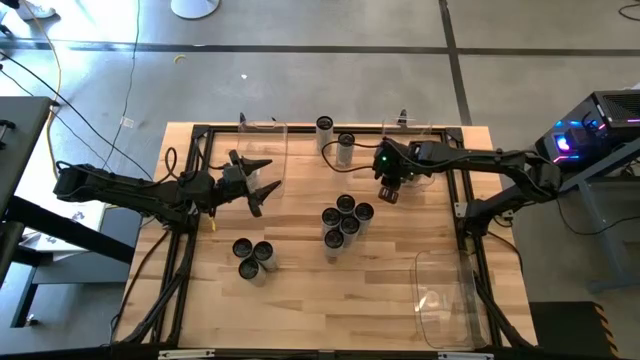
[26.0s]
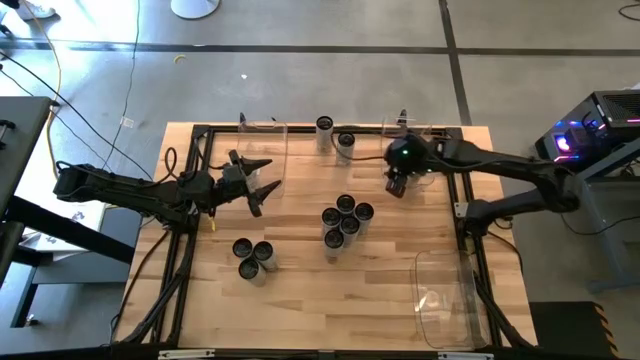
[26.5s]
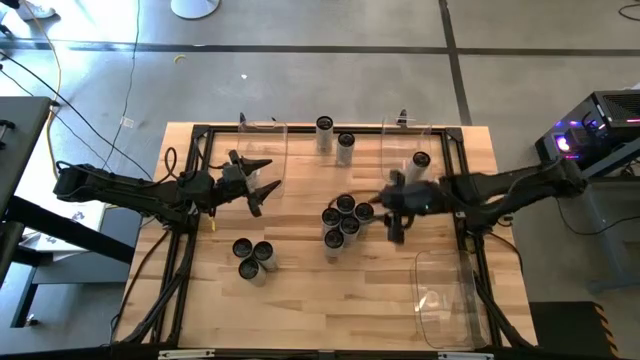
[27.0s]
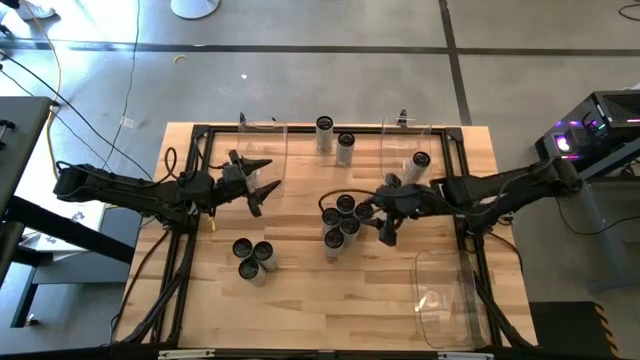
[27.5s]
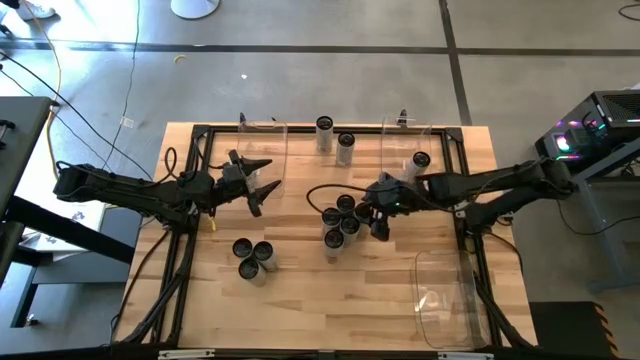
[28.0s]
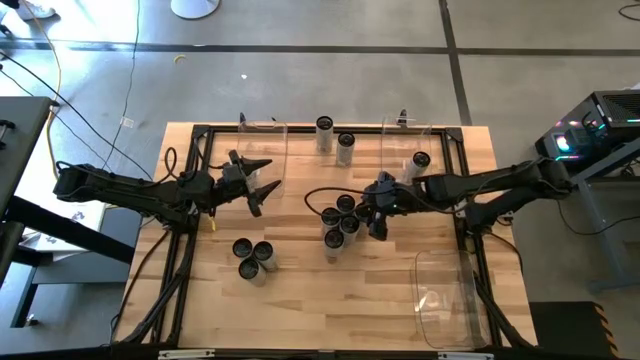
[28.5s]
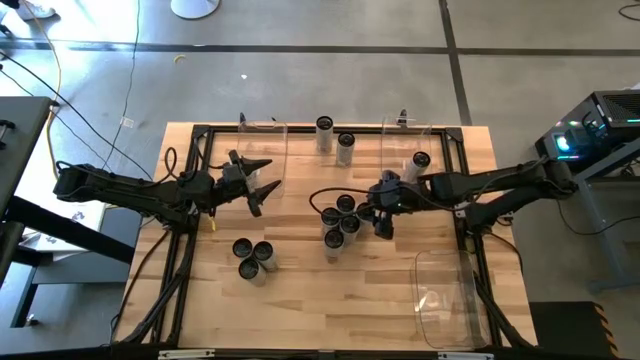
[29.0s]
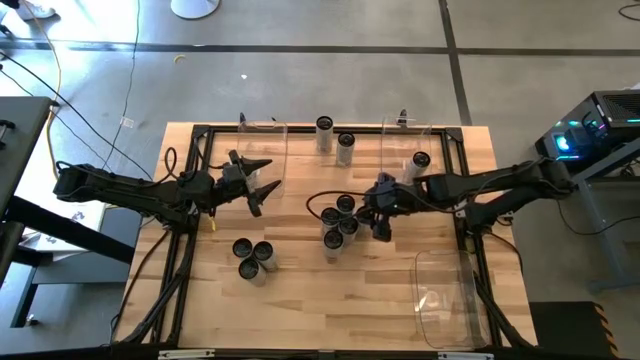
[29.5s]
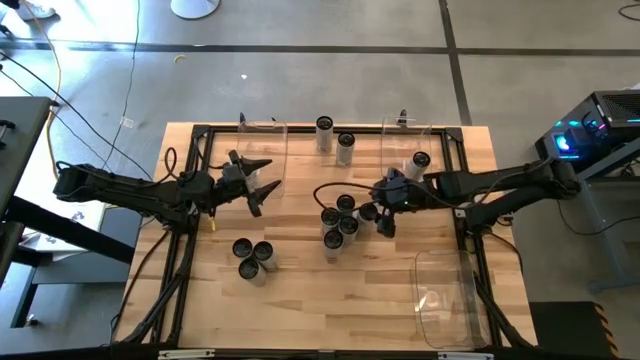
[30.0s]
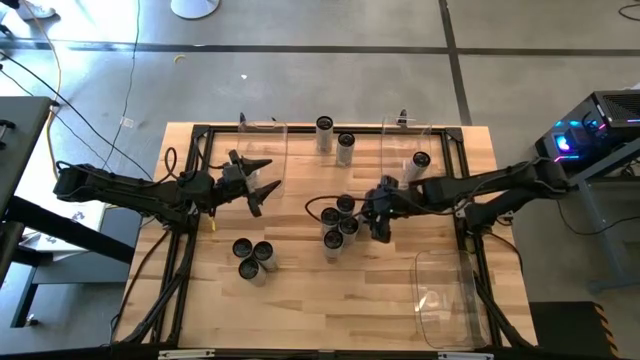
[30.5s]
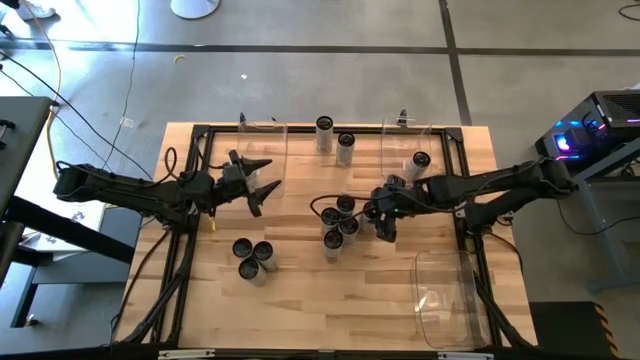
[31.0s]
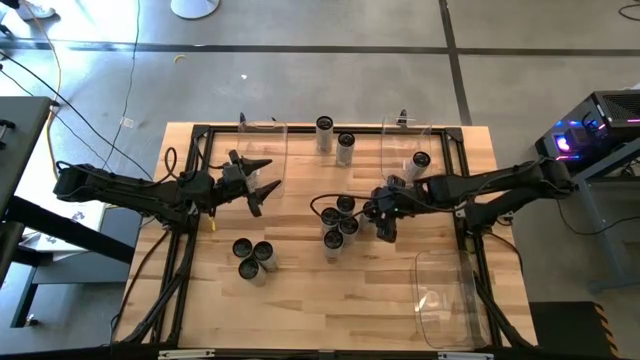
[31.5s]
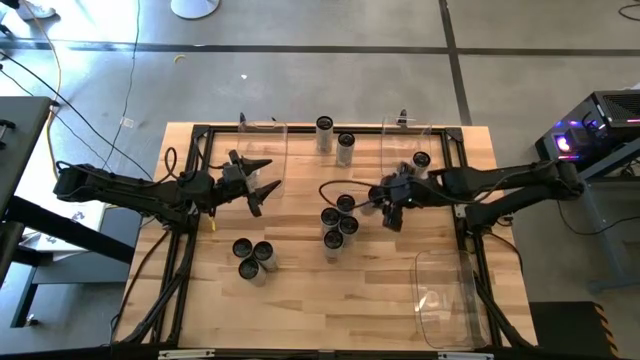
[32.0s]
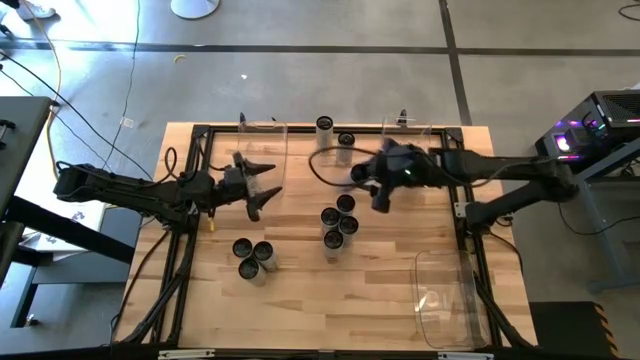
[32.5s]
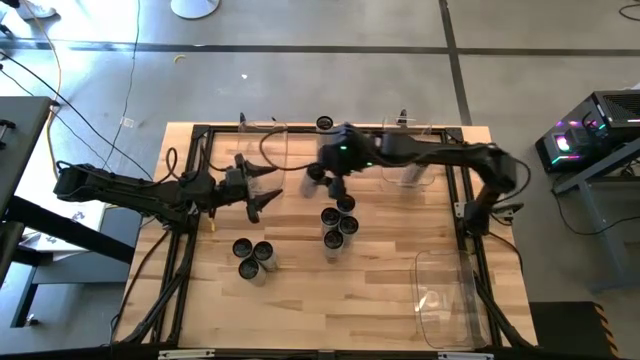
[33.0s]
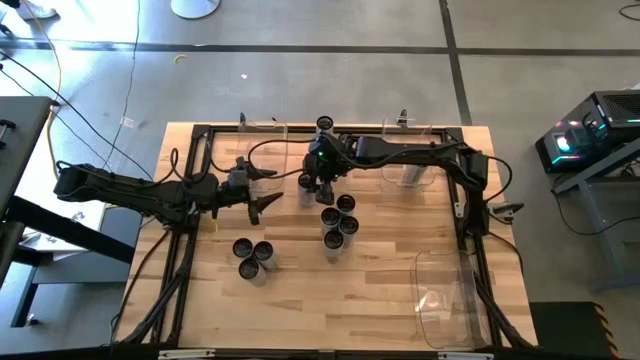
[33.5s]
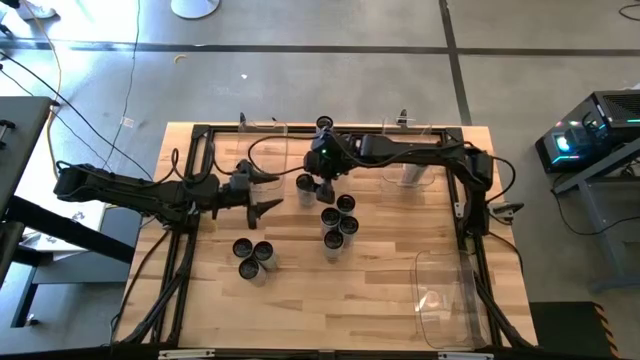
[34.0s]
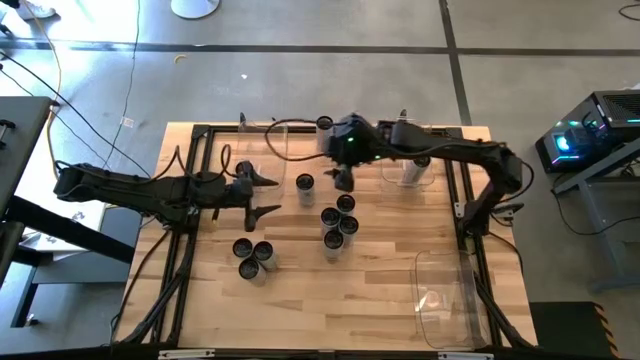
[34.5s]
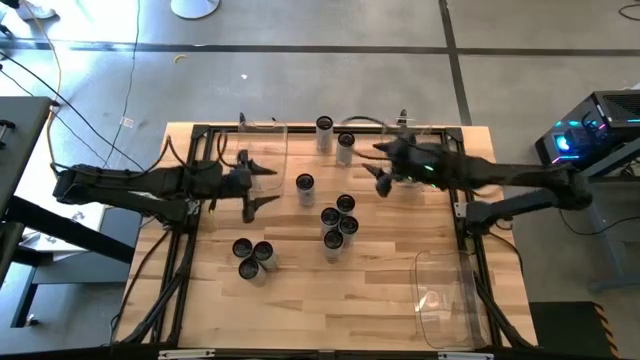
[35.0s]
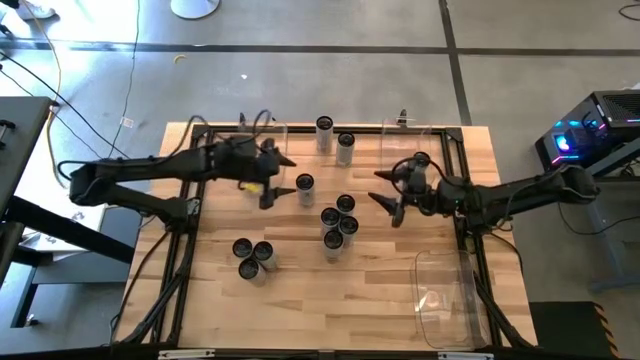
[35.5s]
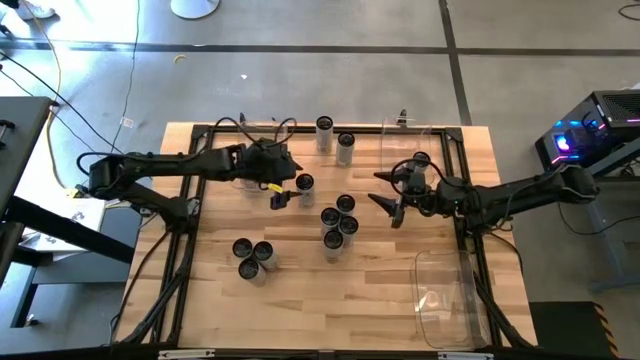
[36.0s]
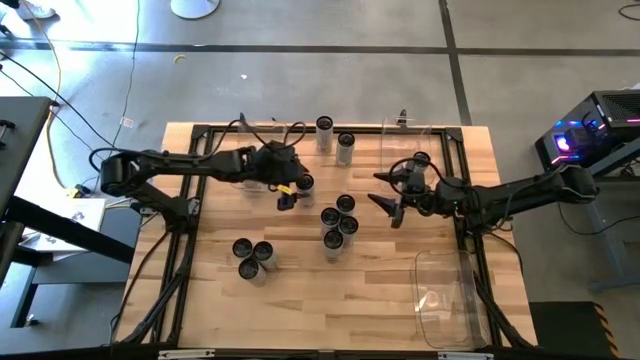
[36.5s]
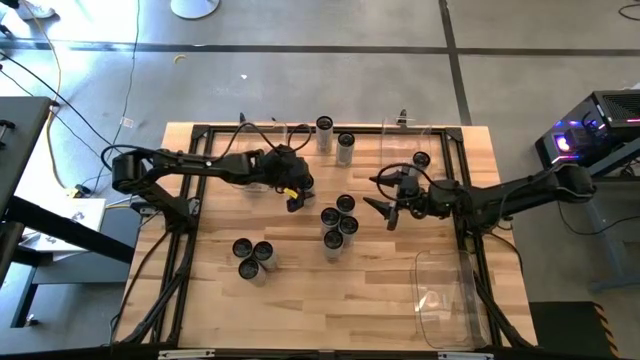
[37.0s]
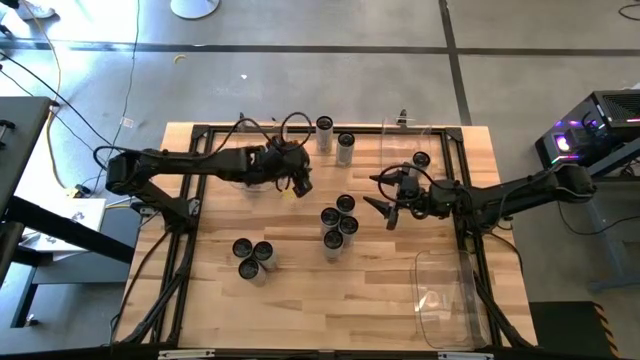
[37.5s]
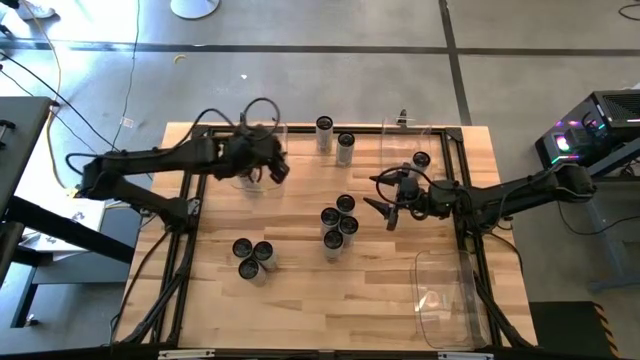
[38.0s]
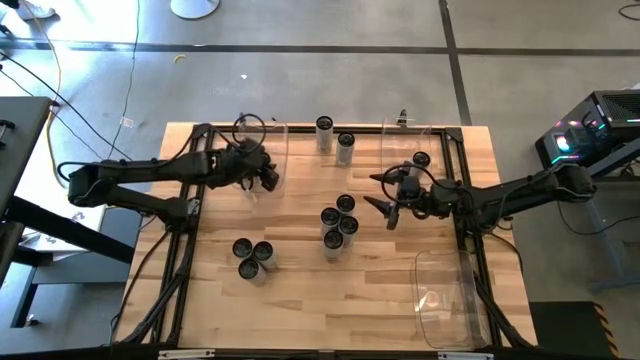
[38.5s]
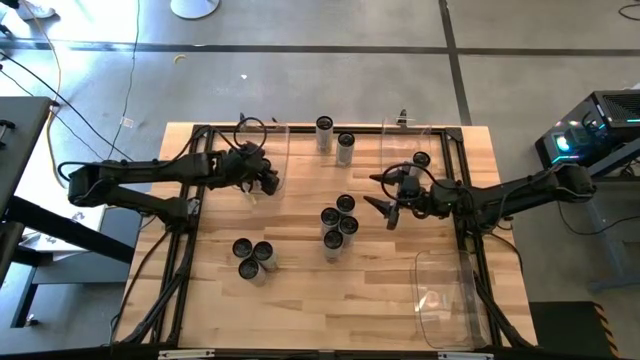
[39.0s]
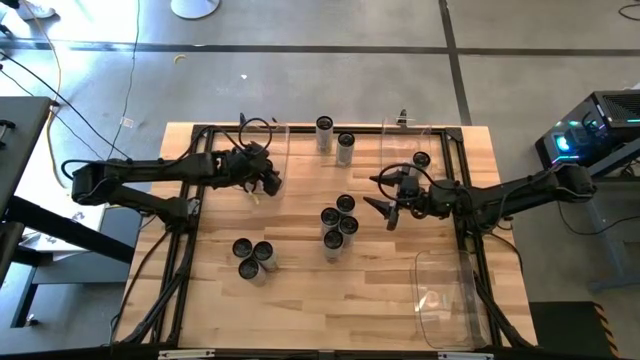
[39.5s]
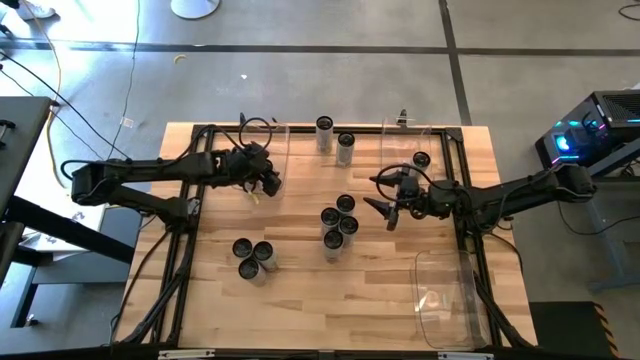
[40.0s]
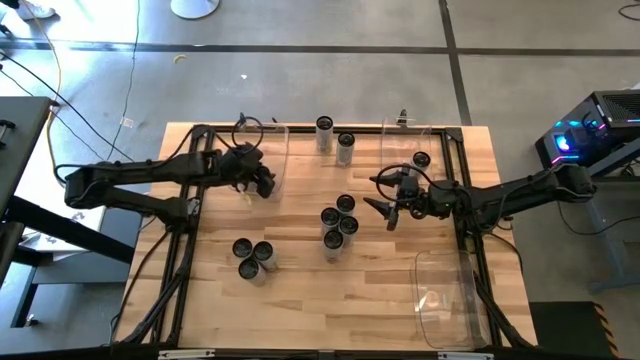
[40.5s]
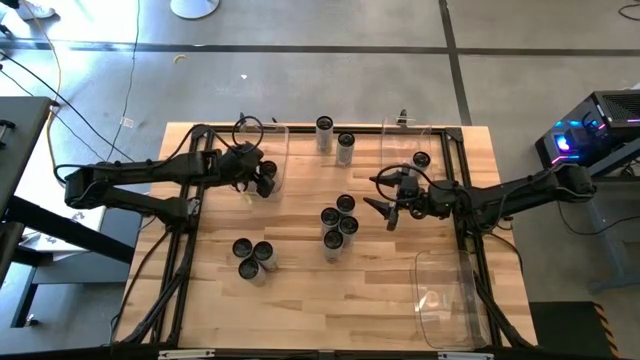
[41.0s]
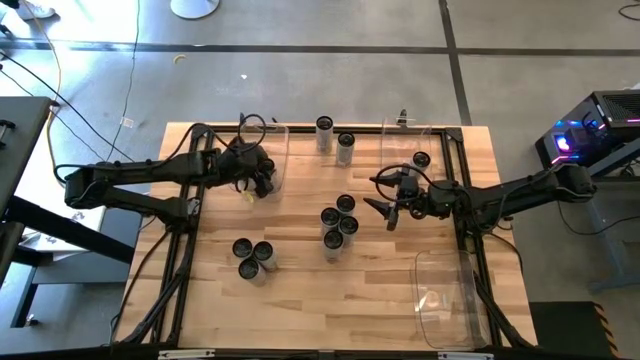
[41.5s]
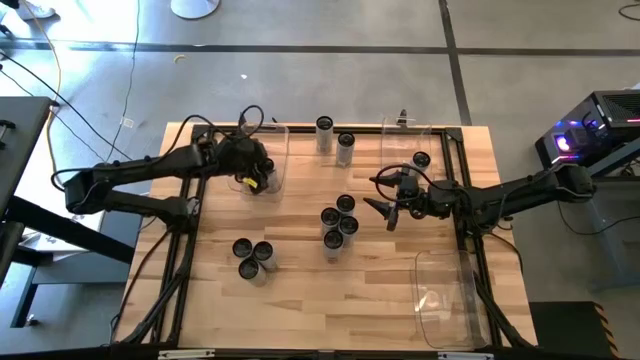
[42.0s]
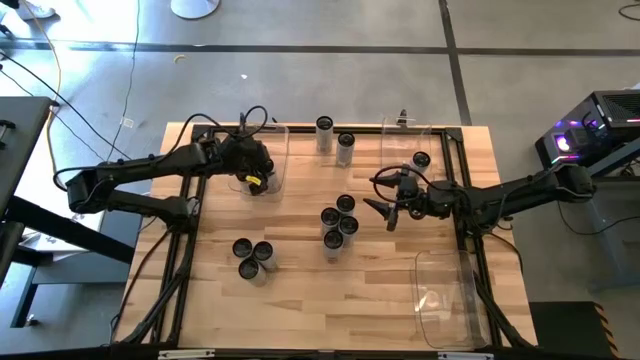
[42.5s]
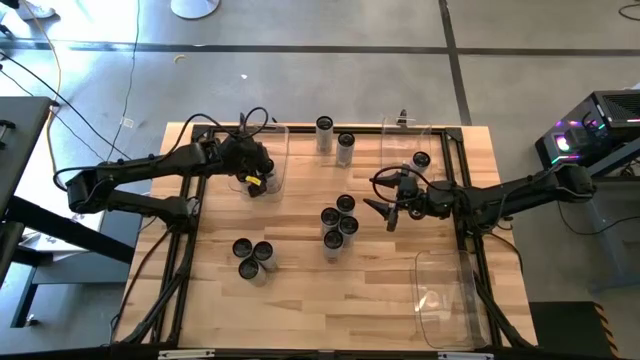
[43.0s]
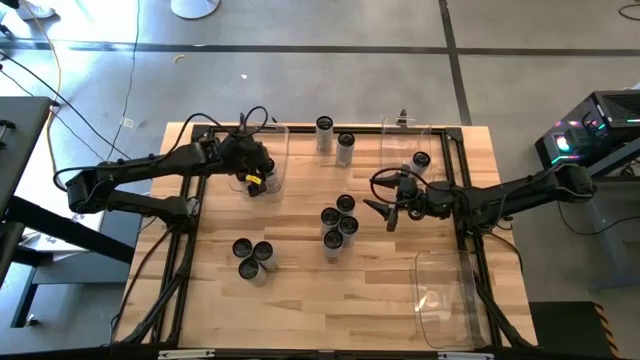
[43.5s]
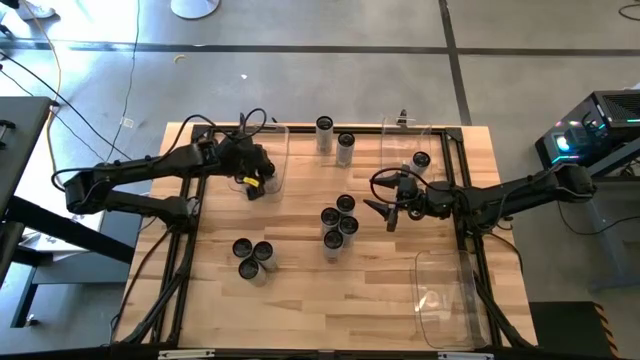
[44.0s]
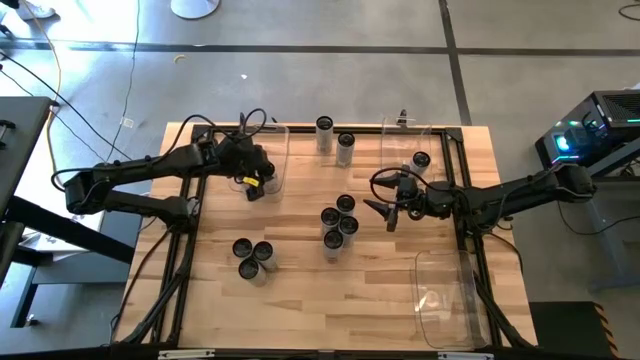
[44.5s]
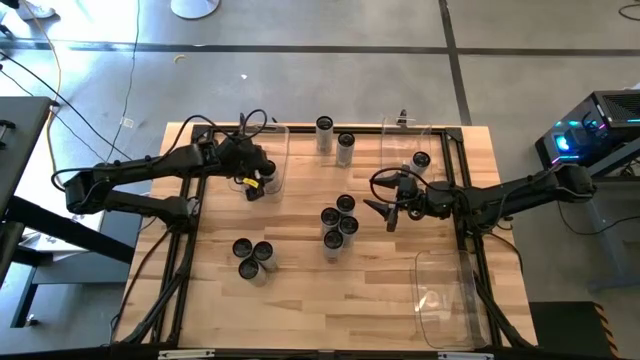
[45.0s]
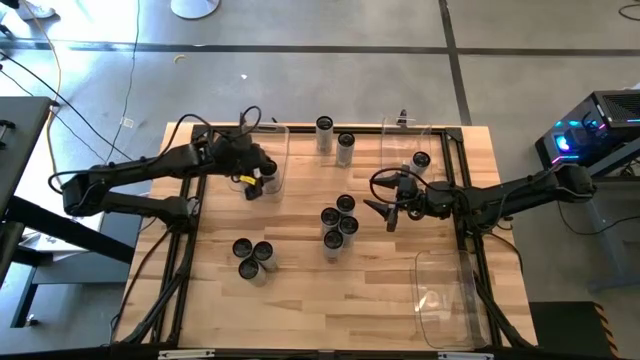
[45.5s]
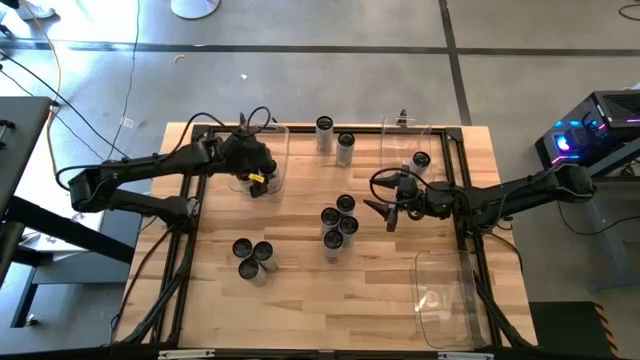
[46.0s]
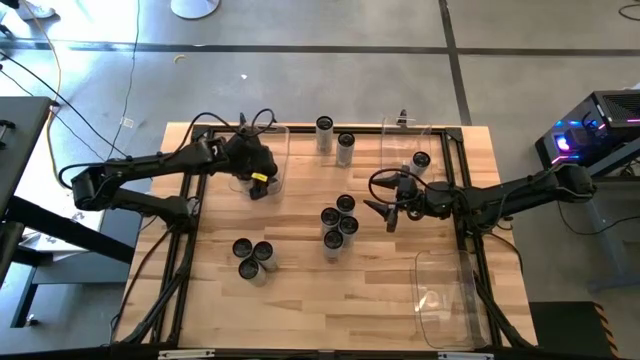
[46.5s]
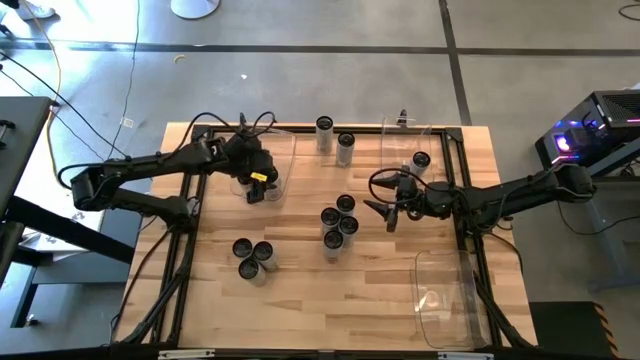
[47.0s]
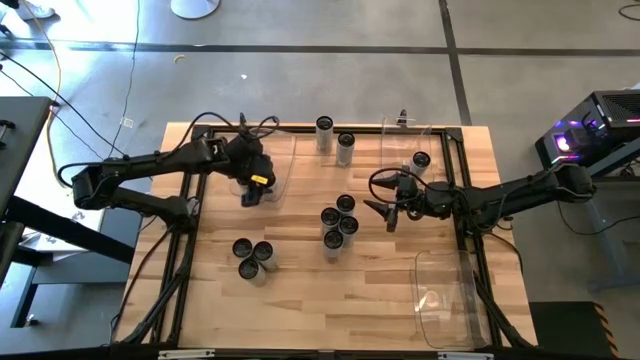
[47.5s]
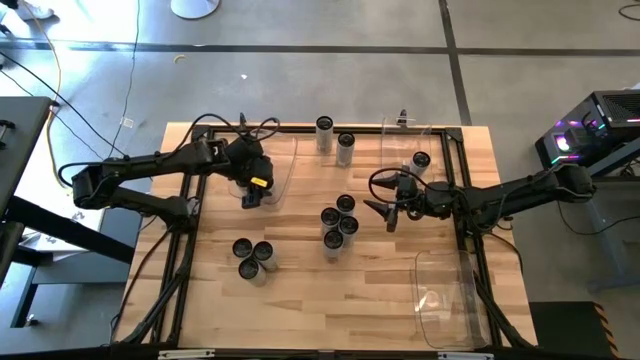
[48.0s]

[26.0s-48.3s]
Task: Sort soda cans
Put the white-pink soda can into the top left transparent bin
